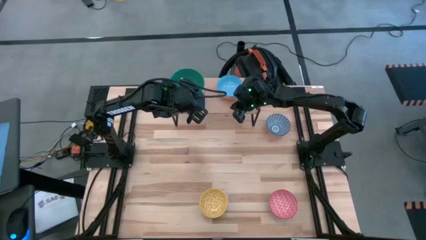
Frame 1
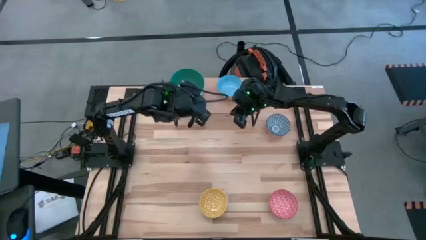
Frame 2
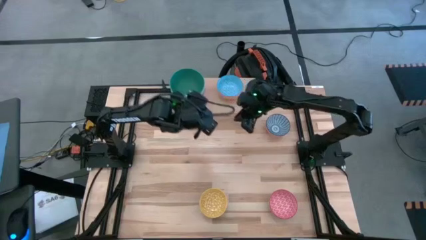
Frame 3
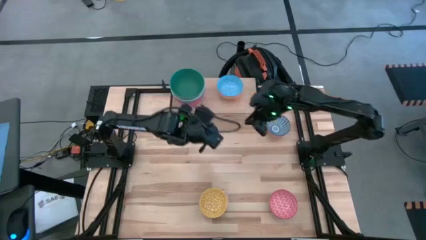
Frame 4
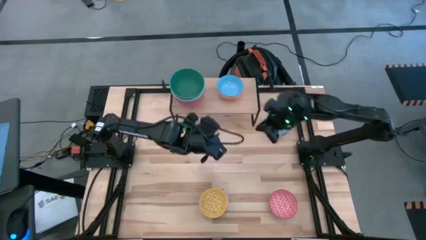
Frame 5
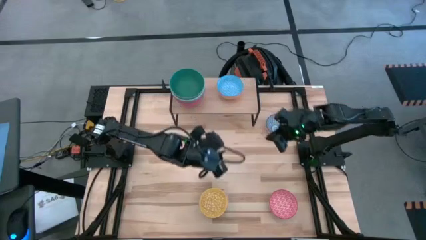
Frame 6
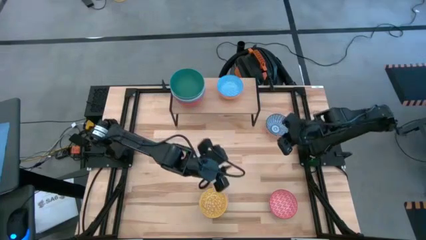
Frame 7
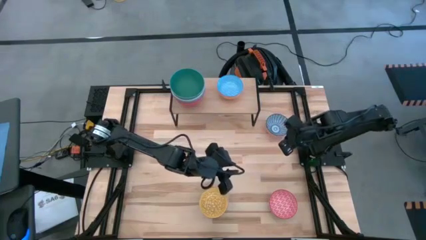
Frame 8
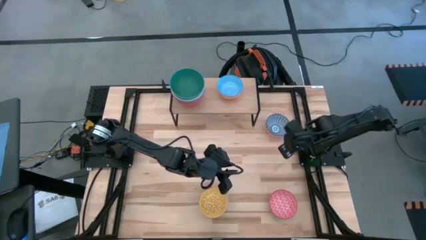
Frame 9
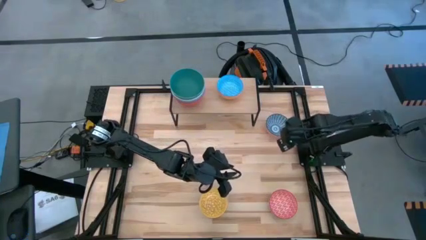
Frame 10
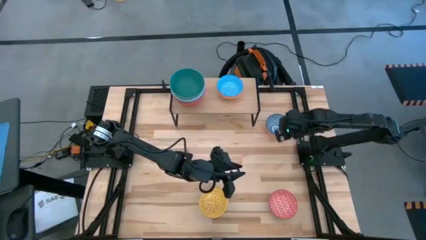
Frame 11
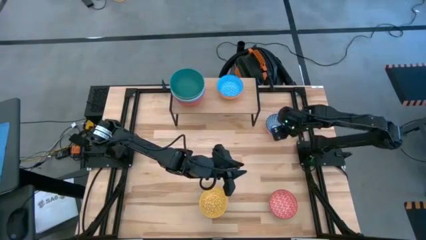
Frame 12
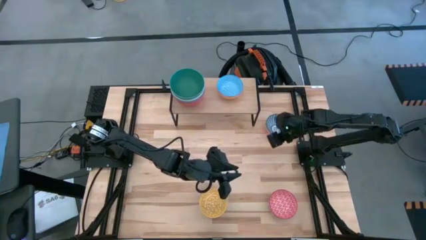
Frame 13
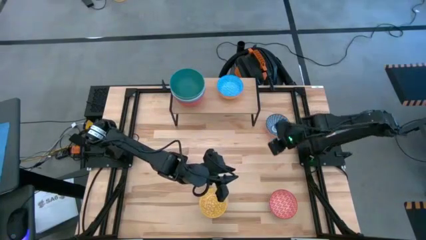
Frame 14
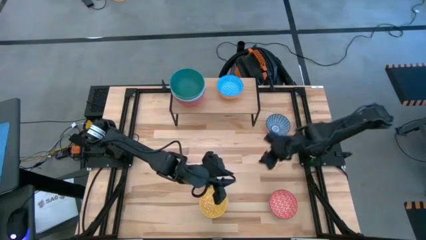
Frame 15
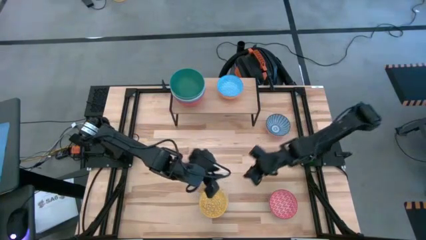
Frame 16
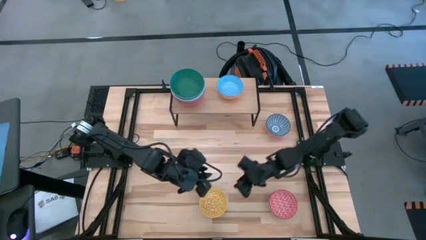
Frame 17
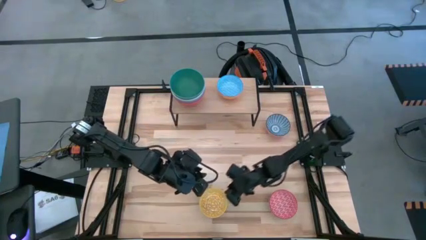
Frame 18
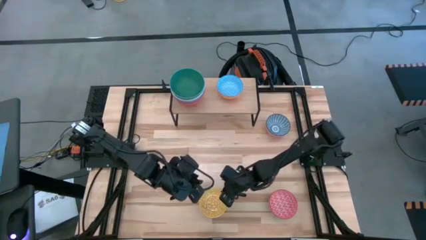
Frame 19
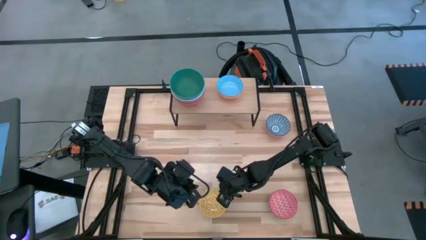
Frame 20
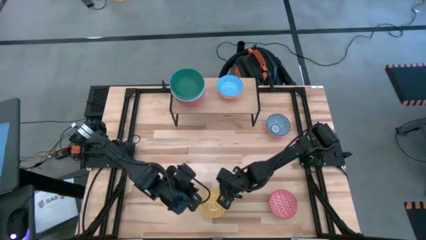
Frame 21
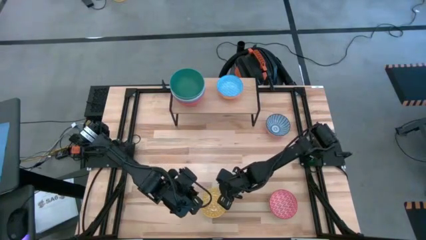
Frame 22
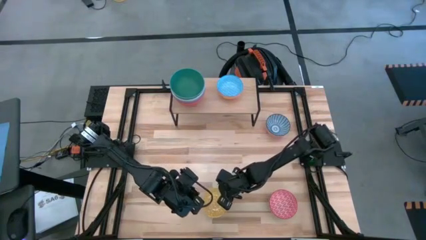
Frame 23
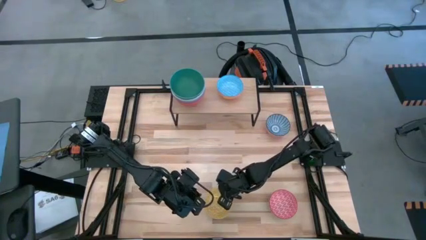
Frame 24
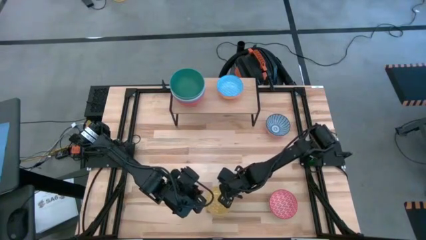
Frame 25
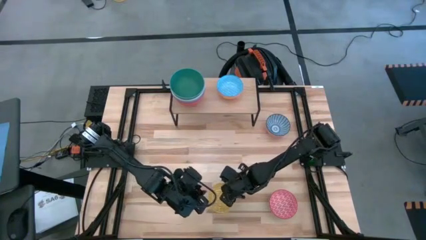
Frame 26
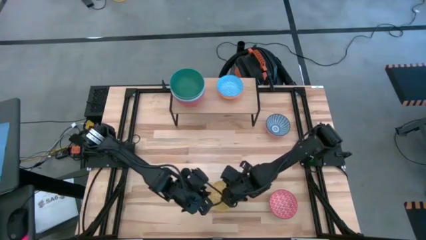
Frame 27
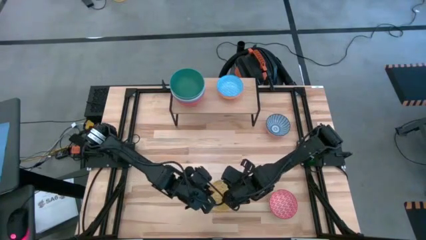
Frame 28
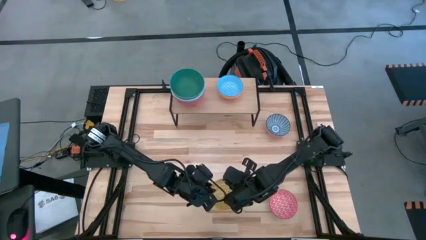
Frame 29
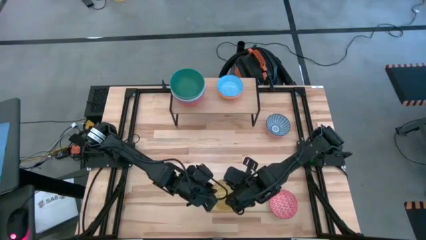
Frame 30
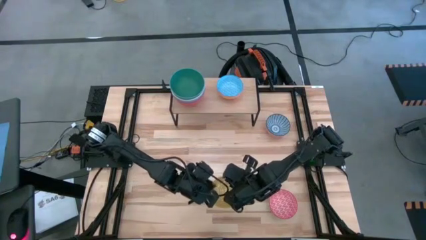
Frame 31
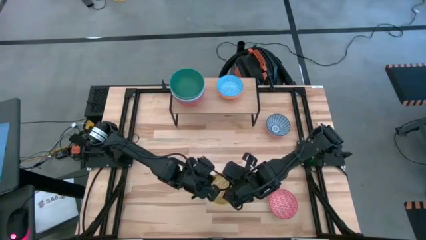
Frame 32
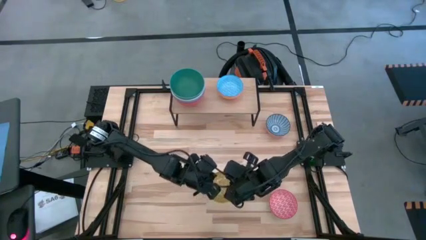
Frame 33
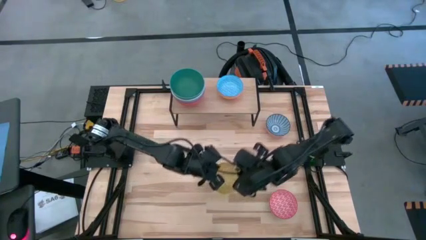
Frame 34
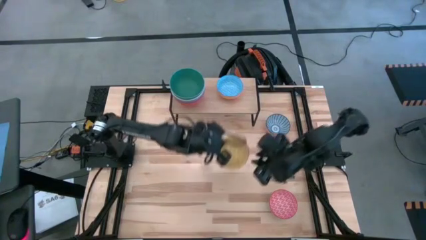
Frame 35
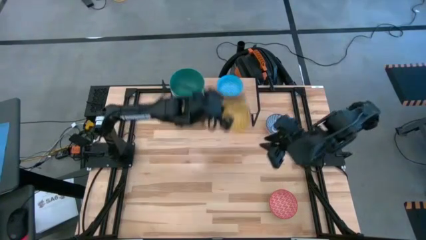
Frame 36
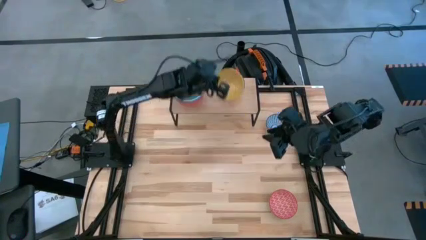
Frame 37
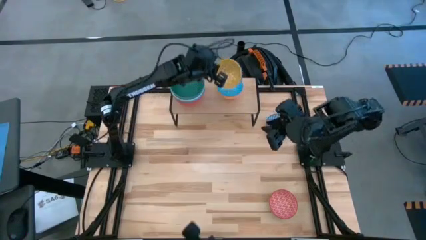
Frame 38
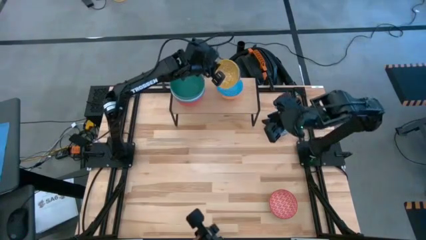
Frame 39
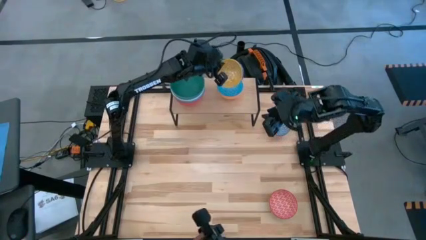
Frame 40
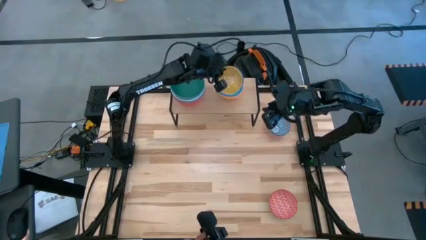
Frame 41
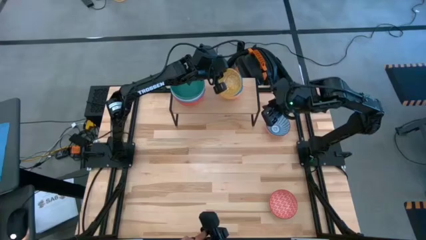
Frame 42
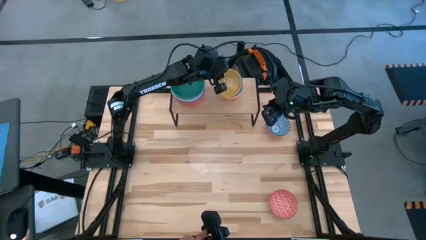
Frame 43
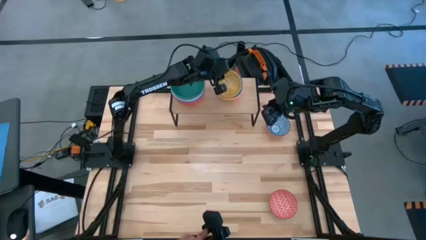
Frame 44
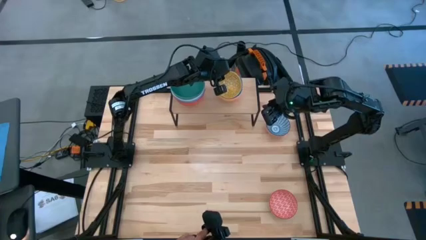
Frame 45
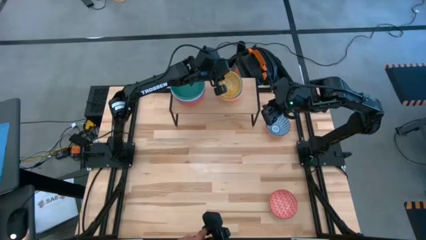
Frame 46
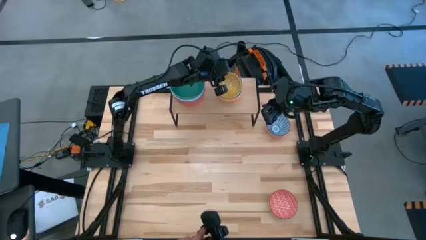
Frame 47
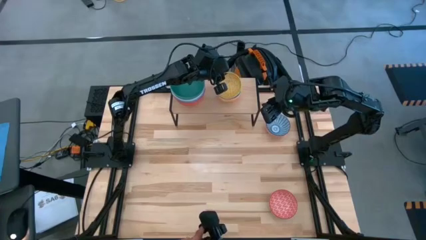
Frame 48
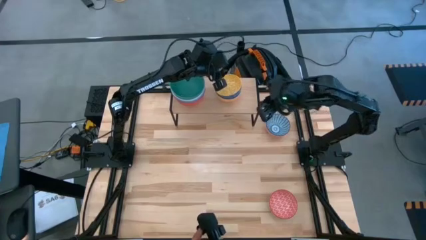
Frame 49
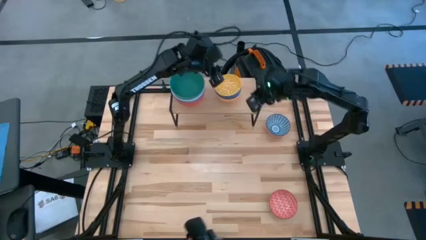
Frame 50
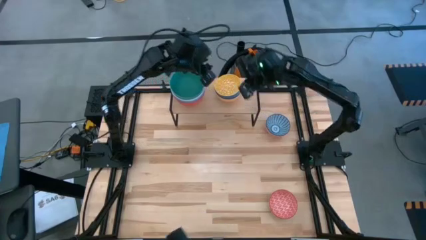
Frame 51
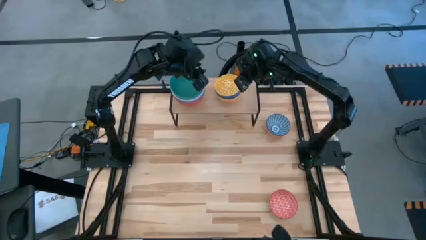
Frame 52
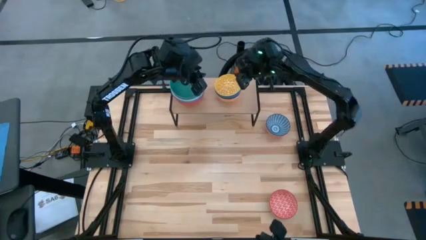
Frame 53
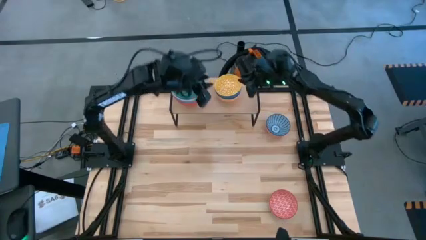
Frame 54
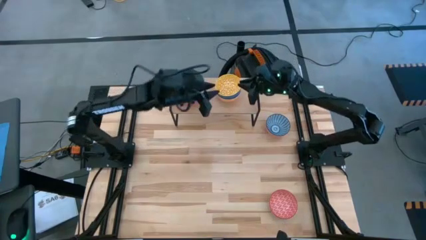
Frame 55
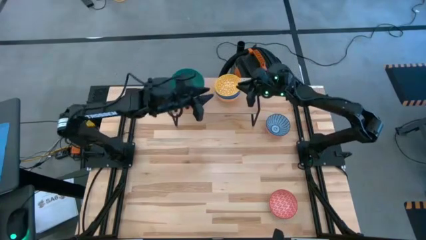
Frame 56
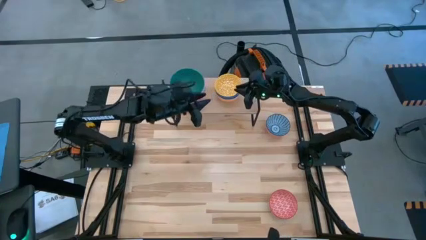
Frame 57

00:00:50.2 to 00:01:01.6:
Task: Place and stack bowls onto a shelf
Stack the yellow pattern bowl on top of the light blue pattern bowl on the shelf

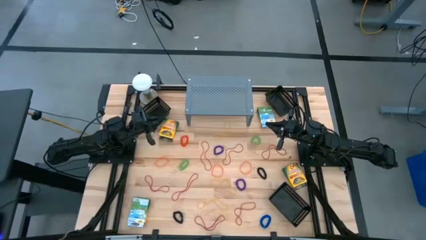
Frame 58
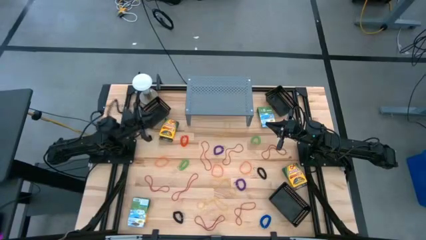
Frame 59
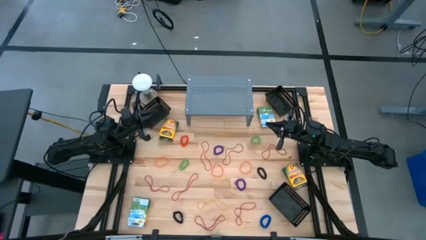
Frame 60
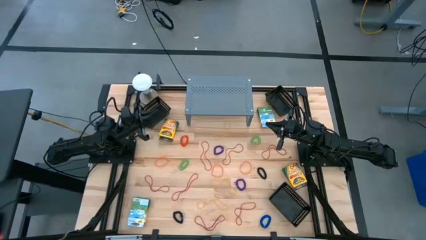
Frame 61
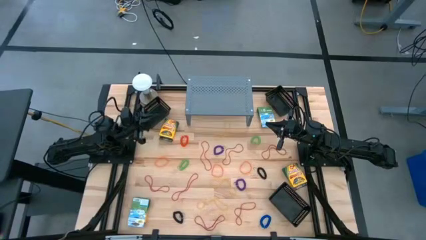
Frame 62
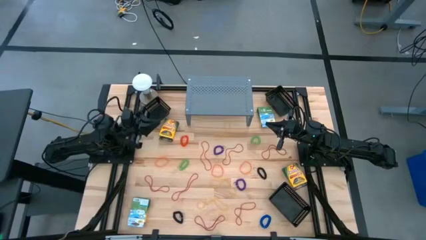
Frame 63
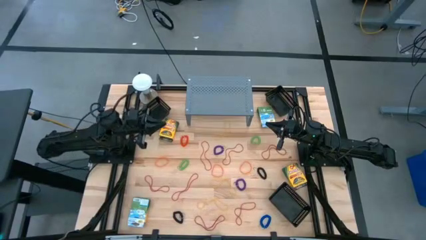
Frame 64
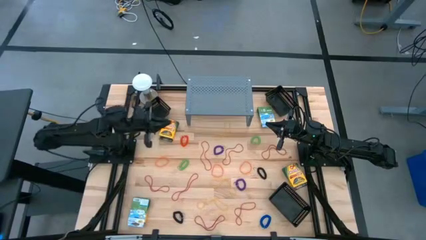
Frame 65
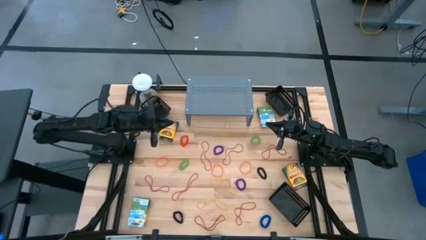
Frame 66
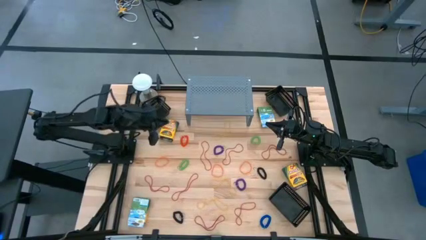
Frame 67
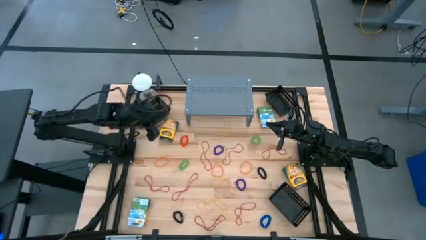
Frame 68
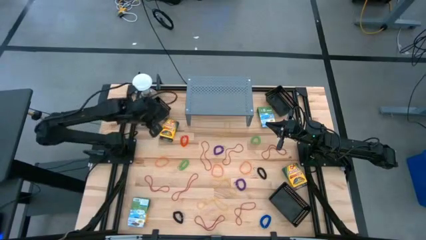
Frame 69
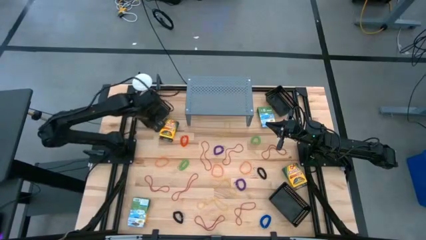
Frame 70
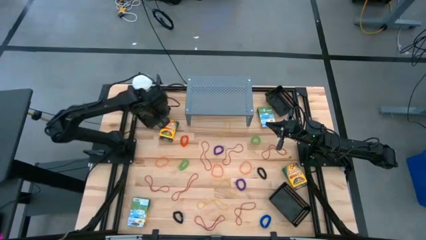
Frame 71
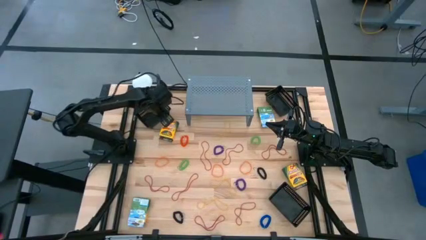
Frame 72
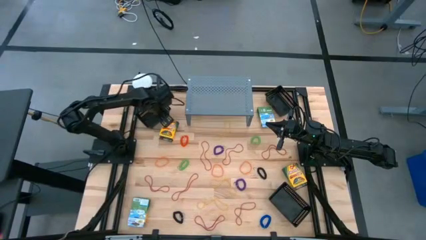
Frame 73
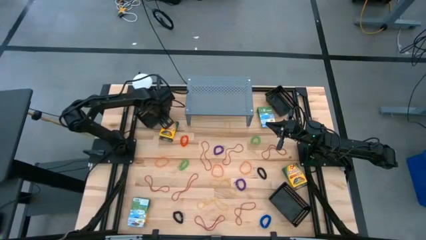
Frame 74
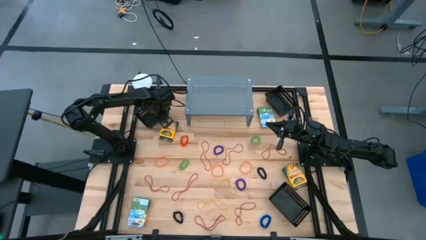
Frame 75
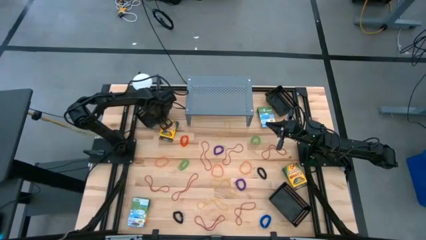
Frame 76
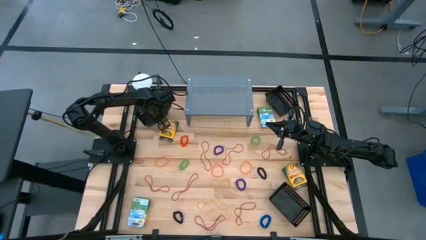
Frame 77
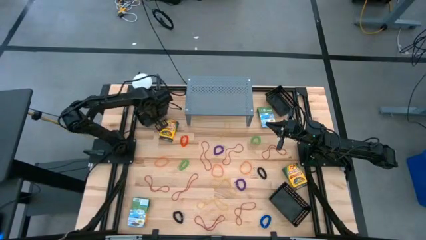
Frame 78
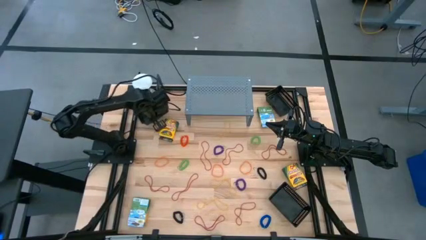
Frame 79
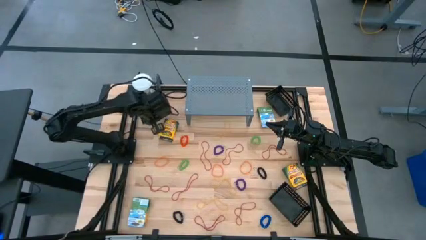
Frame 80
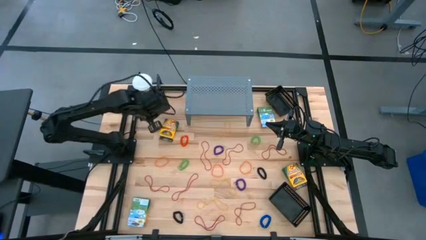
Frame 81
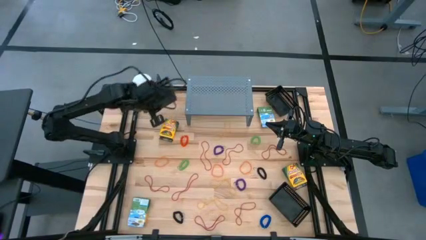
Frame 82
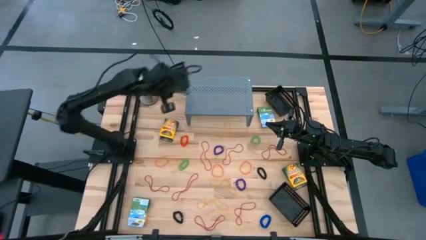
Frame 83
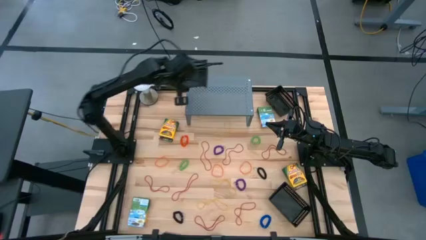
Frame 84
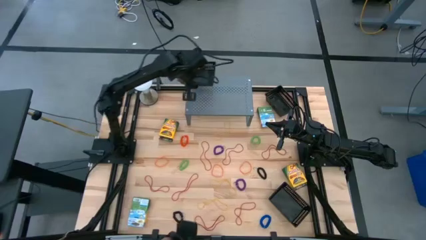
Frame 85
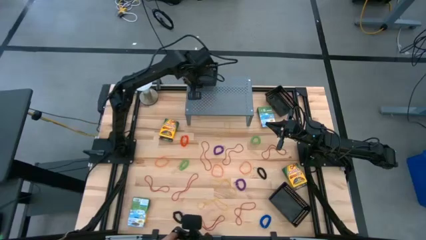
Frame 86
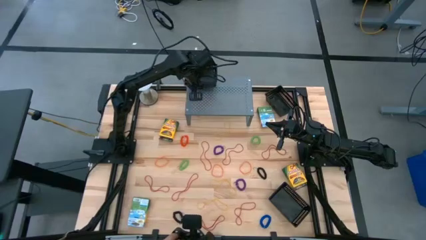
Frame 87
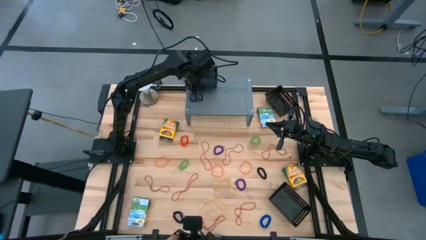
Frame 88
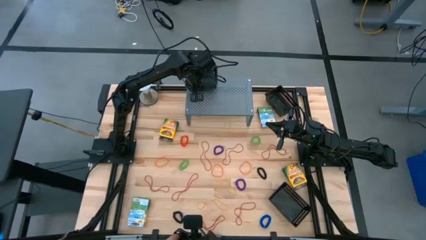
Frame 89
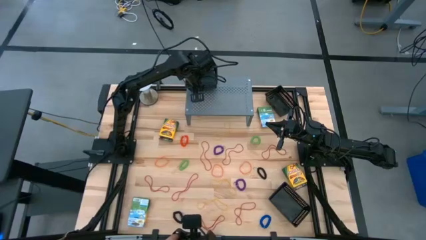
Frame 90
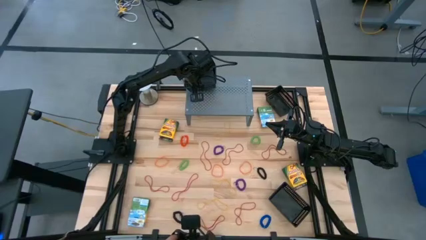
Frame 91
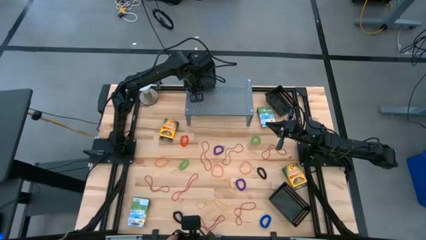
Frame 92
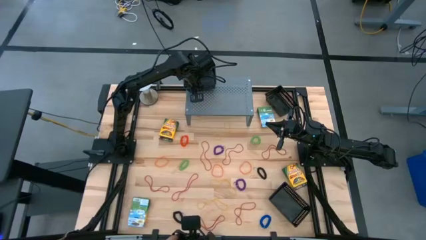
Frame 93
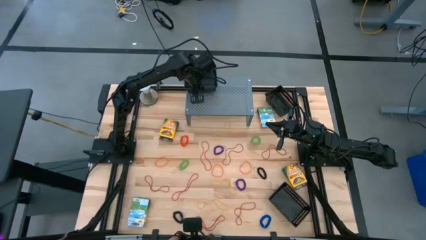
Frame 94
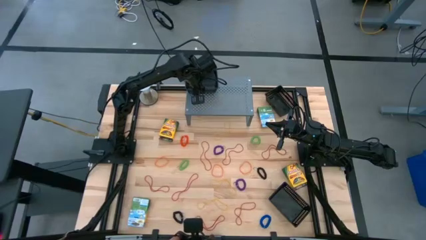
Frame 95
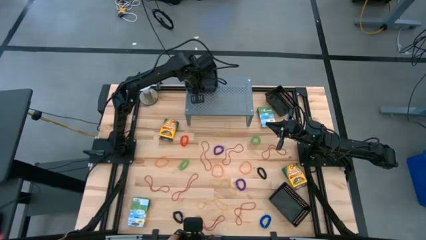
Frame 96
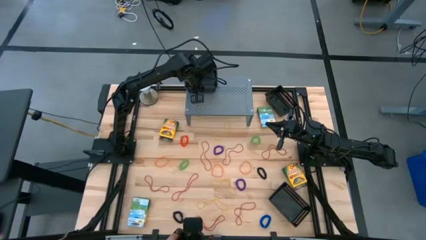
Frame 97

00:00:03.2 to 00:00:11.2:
Task: Pick & Place Office Desk Supplies
Put the black basket on the shelf
